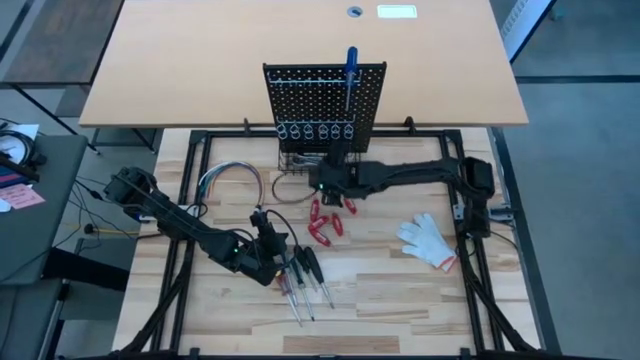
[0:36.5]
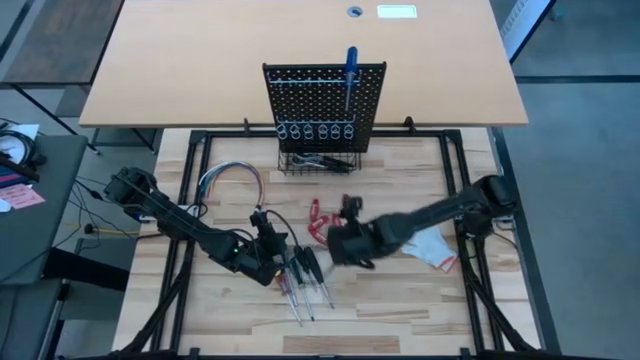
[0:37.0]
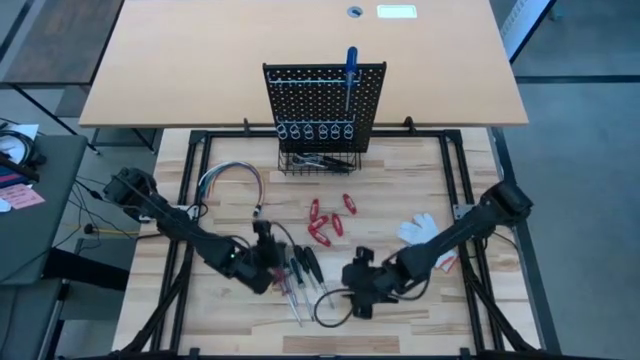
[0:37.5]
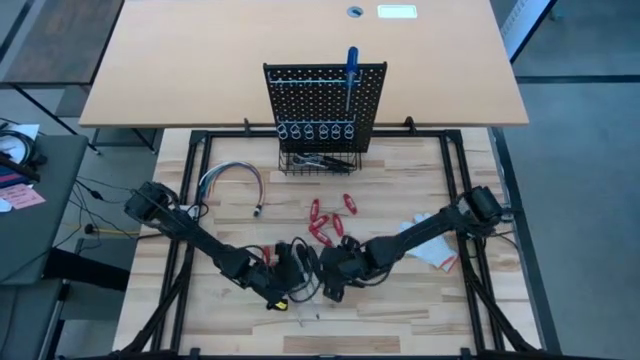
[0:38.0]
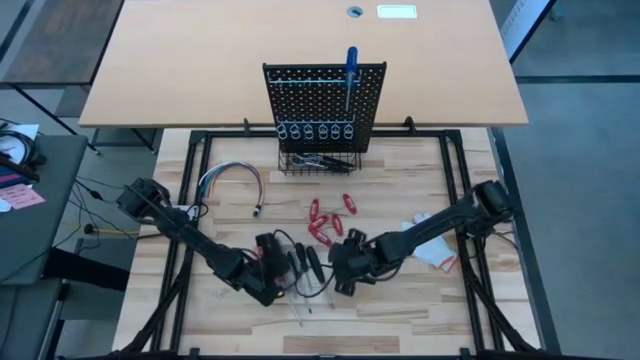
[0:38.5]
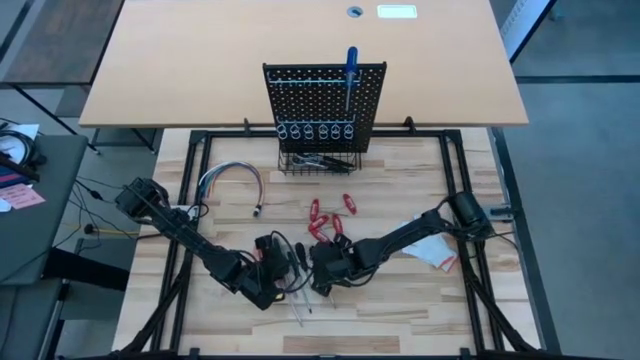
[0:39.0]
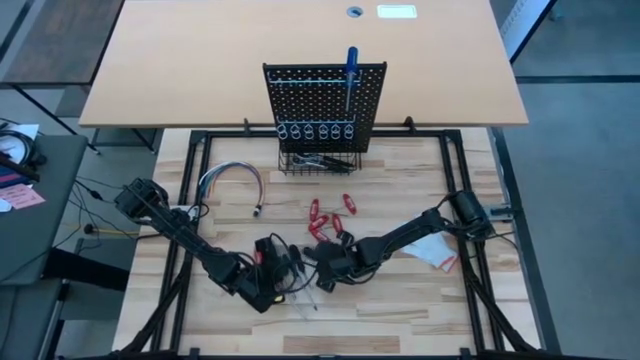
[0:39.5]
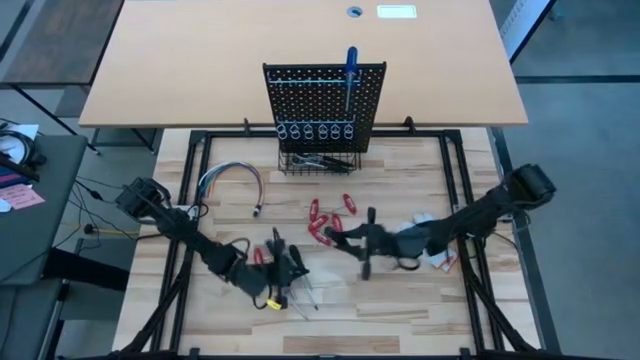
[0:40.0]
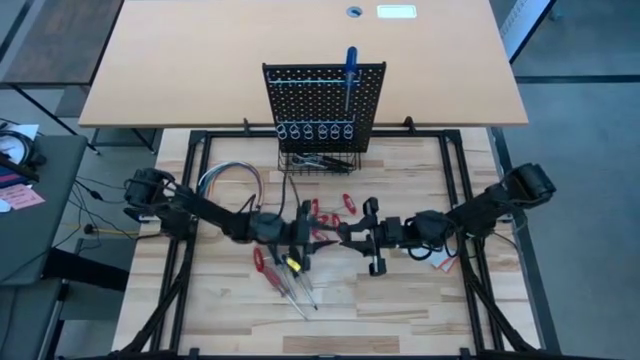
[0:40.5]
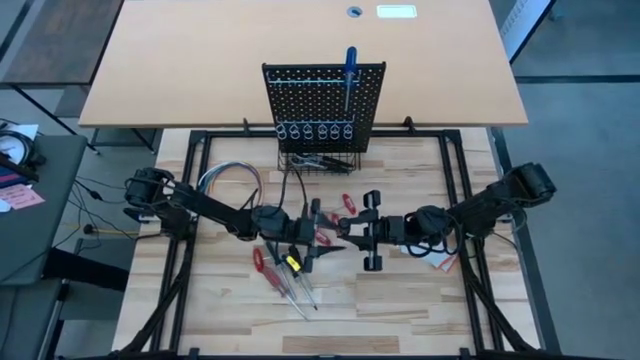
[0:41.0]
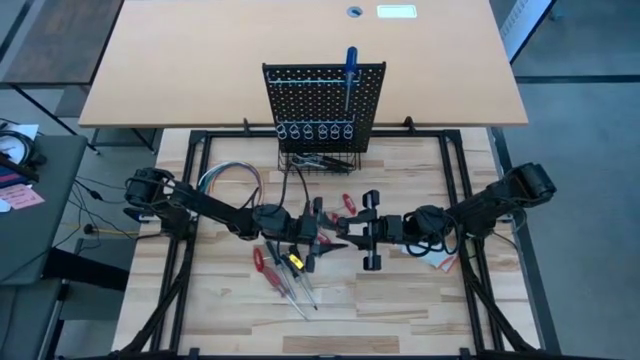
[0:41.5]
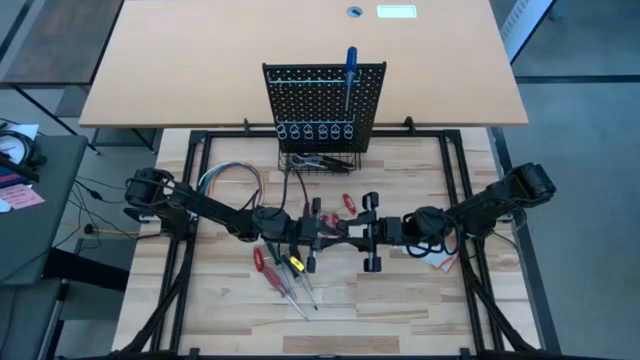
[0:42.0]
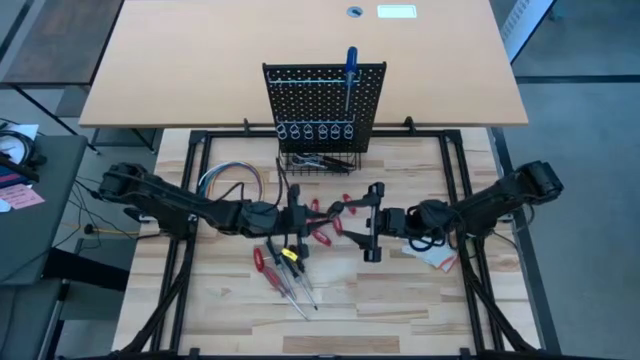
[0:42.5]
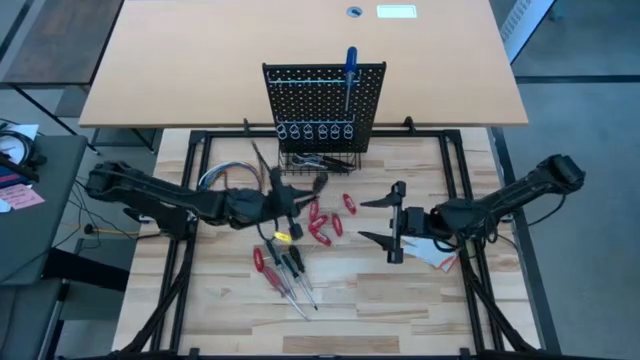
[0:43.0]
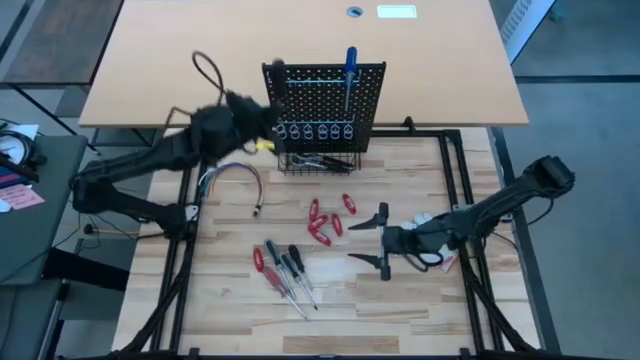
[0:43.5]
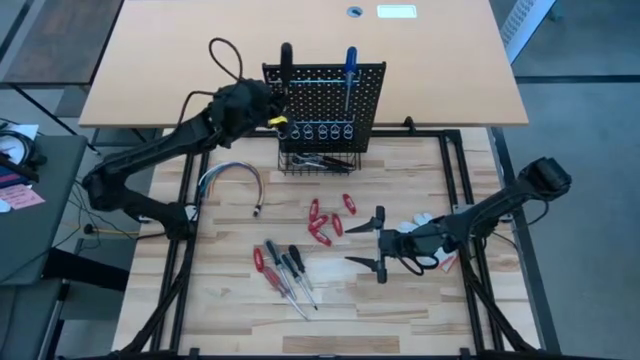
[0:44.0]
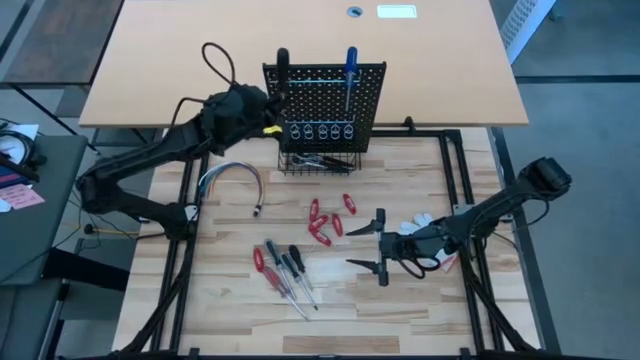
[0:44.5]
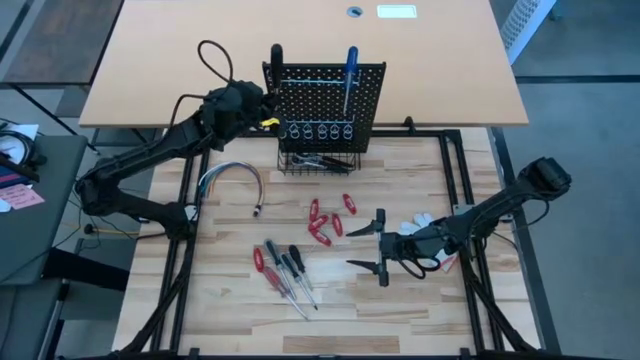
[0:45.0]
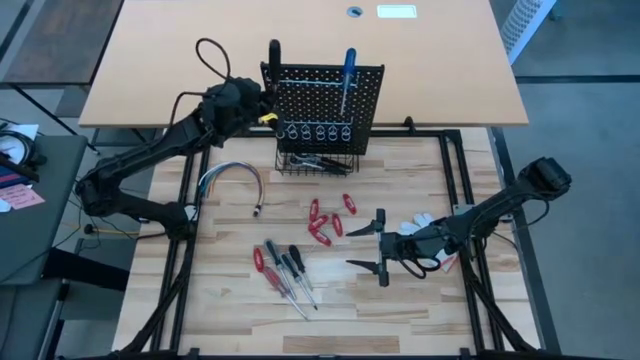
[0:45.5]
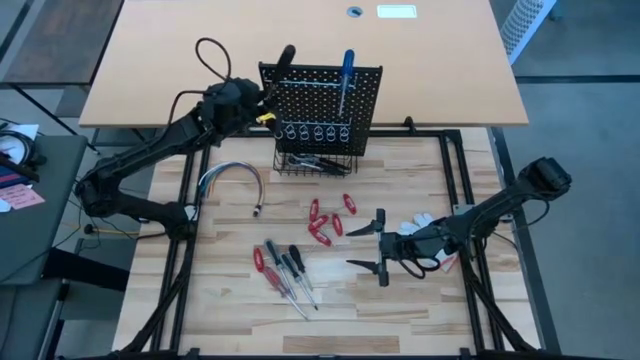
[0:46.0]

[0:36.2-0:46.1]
Task: Hang tools onto peg board
Hang the black nut driver on the pegboard

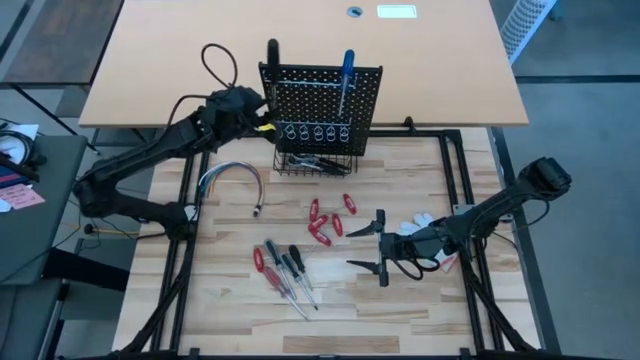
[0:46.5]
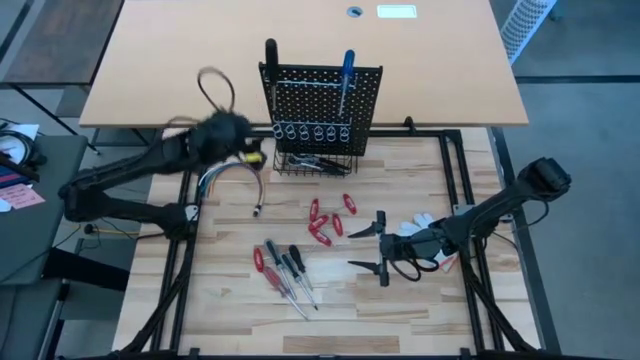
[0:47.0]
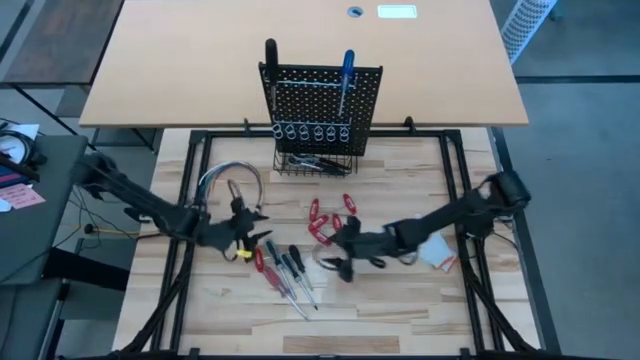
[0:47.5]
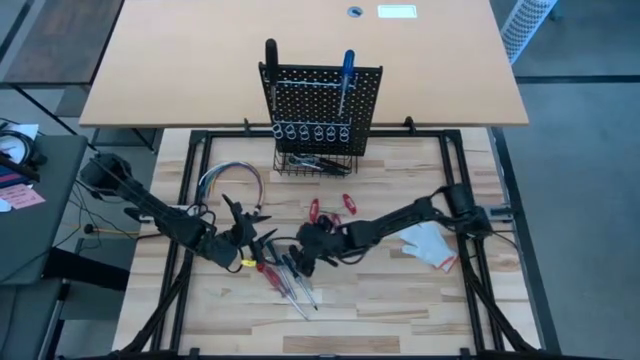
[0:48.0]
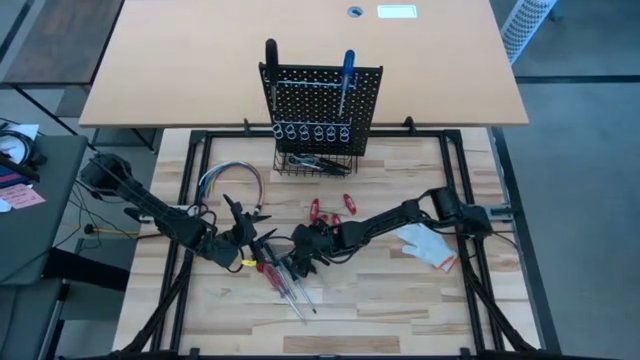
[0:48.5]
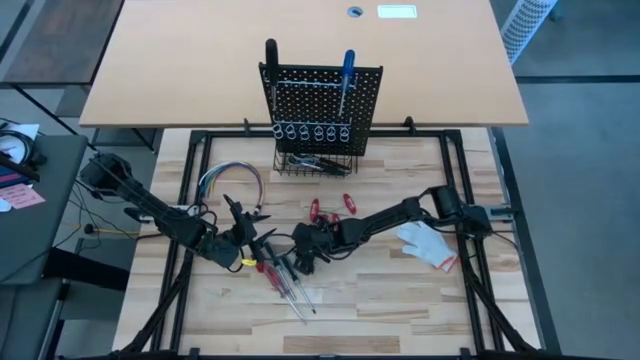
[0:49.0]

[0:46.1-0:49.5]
Hang the black screwdriver on the pegboard

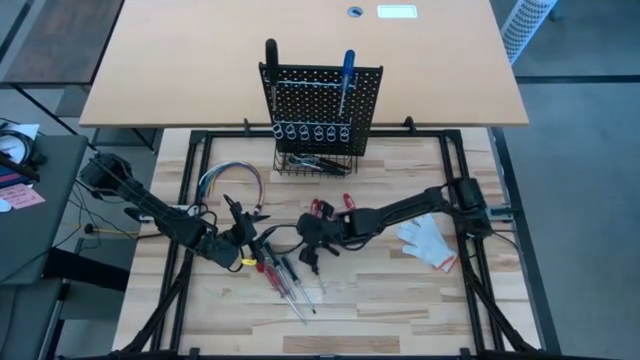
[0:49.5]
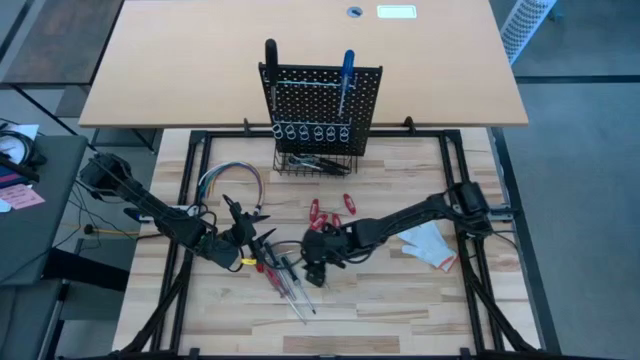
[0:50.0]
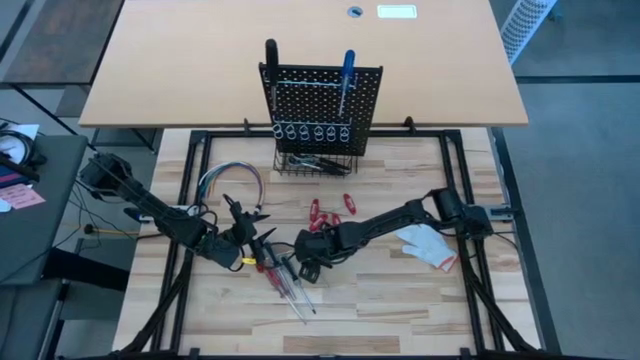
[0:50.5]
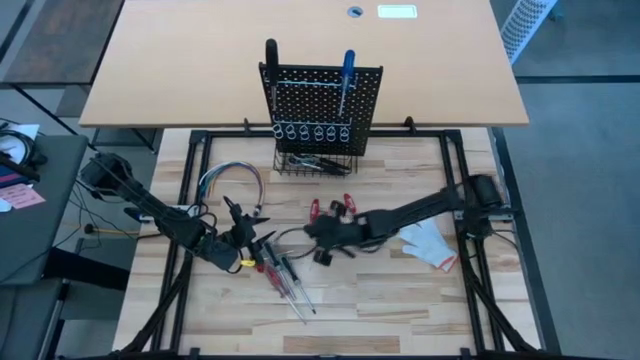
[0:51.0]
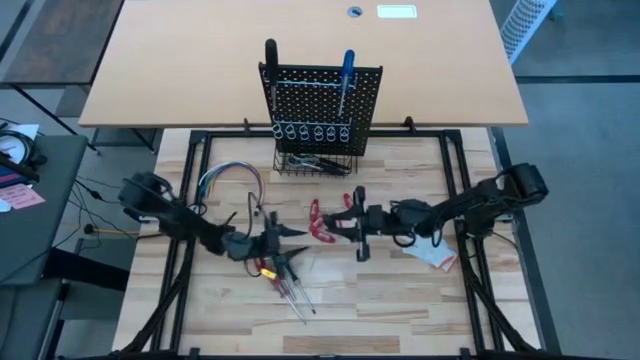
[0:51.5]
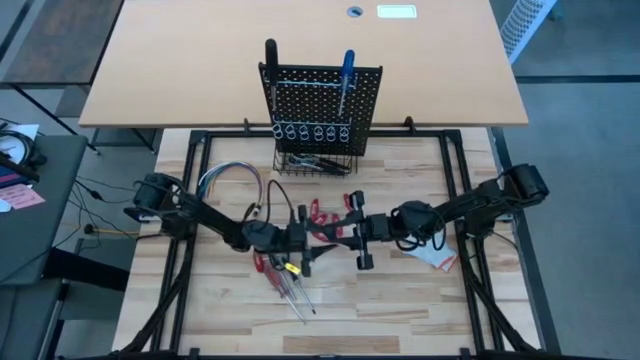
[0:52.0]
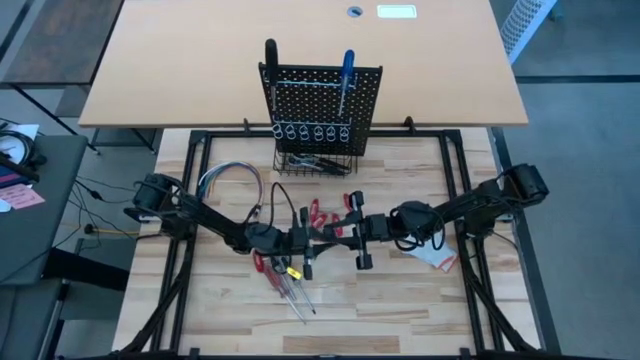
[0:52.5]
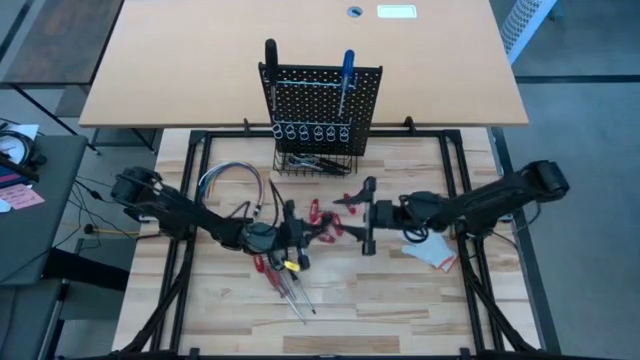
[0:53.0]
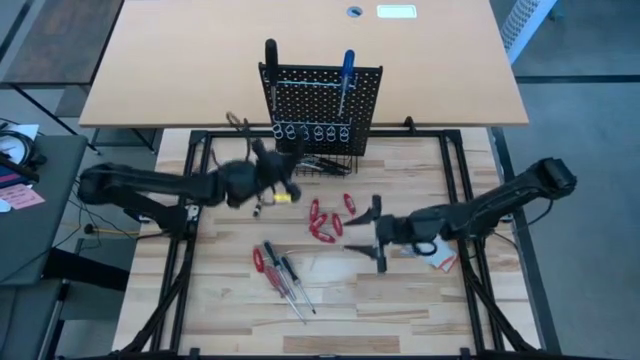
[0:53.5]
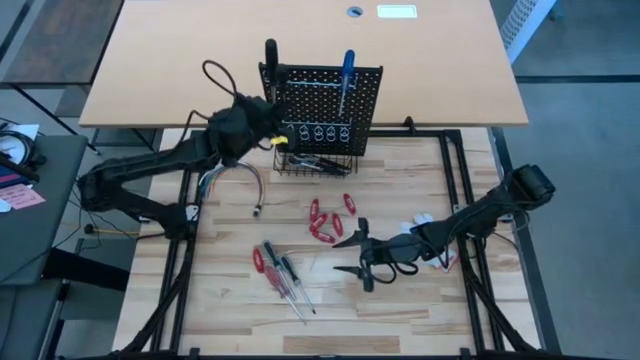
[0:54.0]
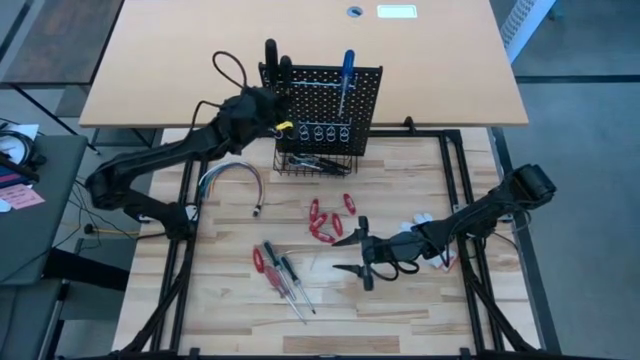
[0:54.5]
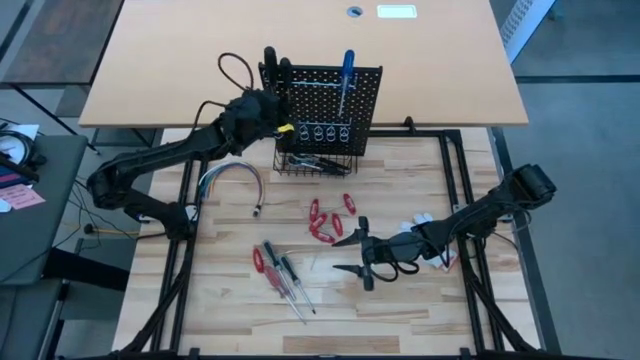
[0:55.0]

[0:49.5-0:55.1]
Hang the black screwdriver on the pegboard

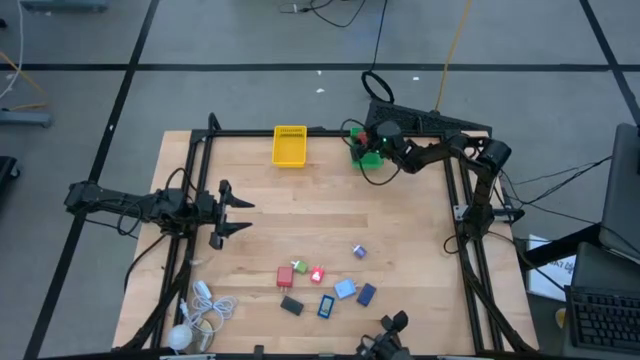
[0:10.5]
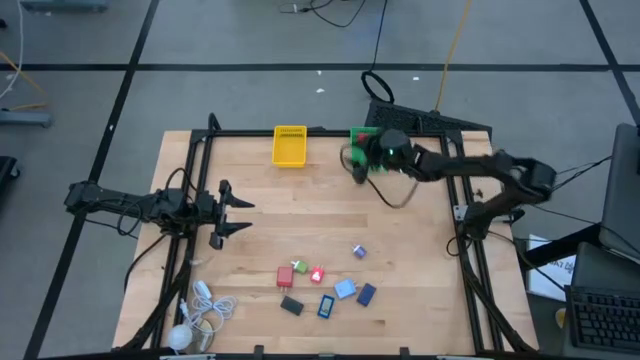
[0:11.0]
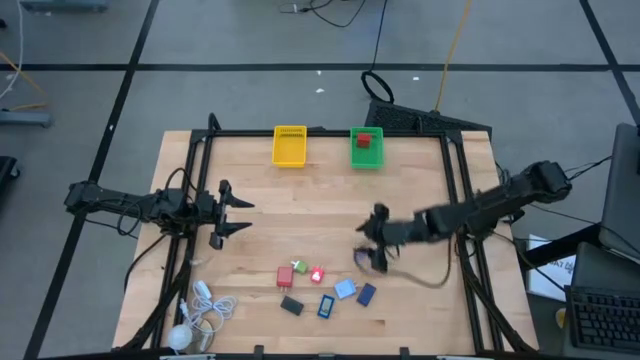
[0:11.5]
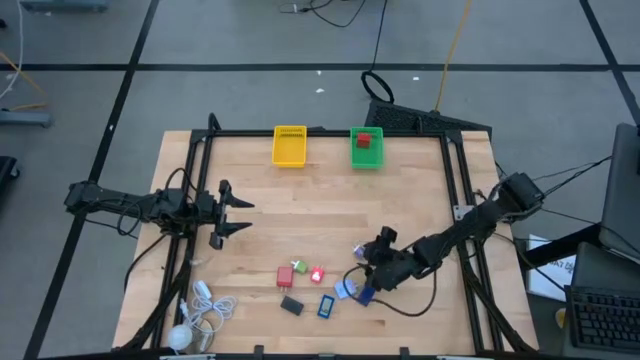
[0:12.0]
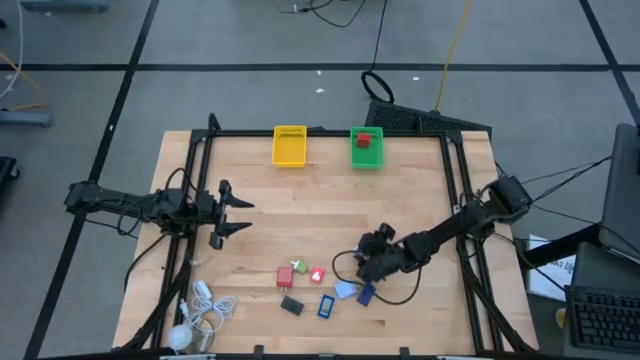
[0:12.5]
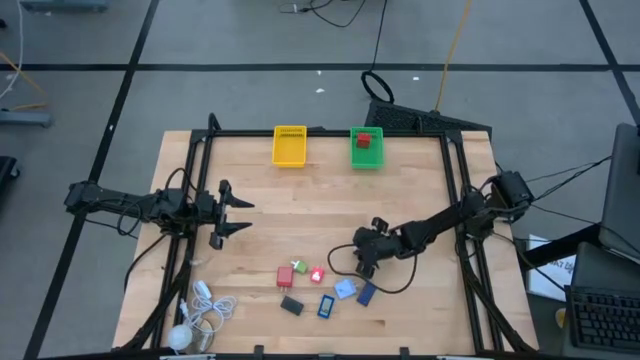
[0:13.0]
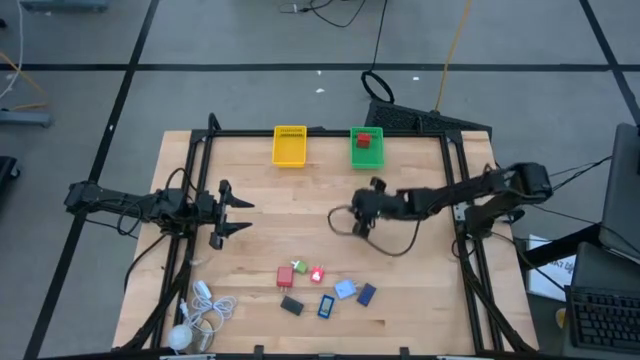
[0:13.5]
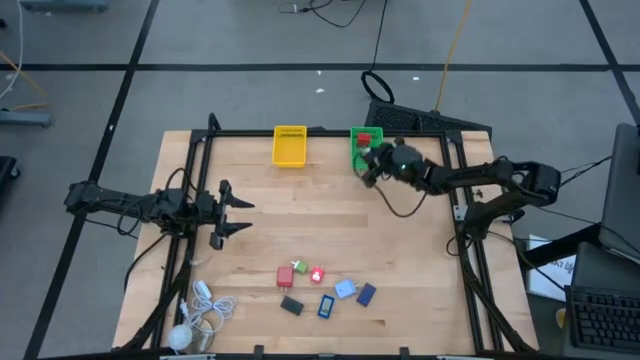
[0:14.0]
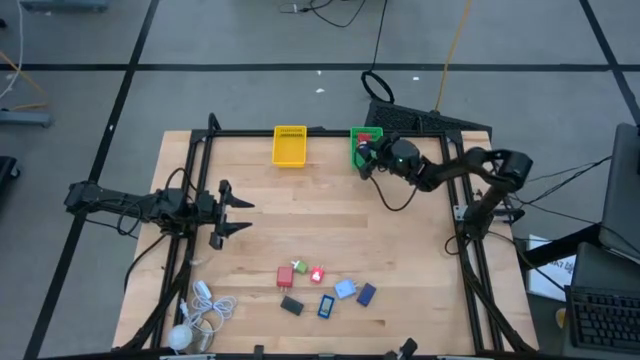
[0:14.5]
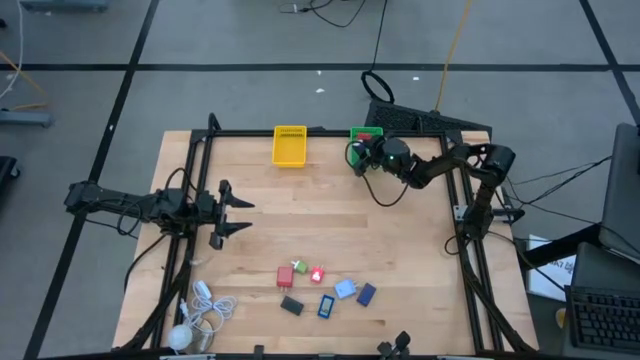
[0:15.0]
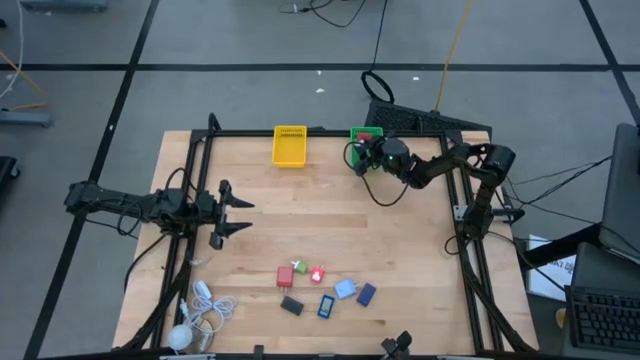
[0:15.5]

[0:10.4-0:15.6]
Task: Pick & Place Office items
Put the violet charger adapter into the green bin
